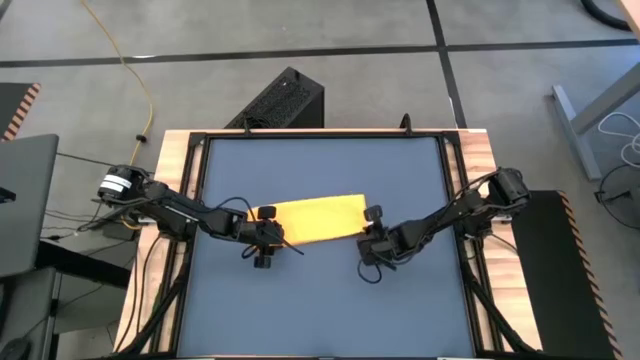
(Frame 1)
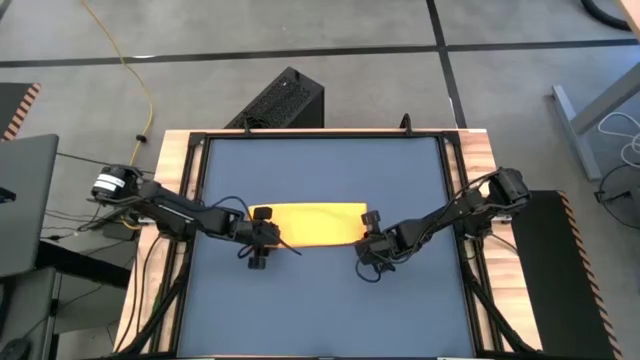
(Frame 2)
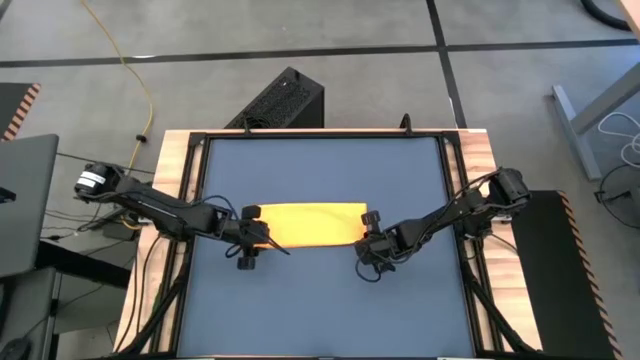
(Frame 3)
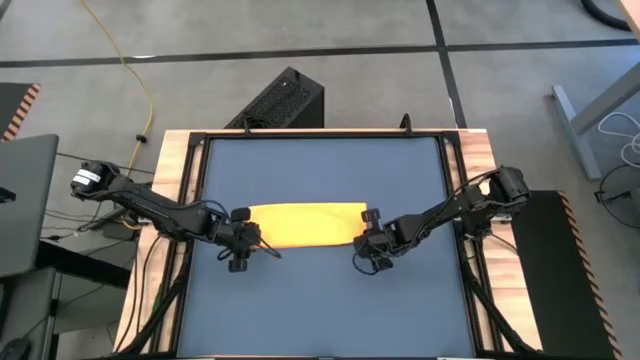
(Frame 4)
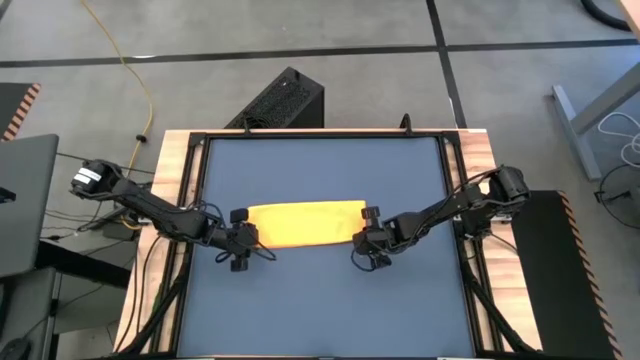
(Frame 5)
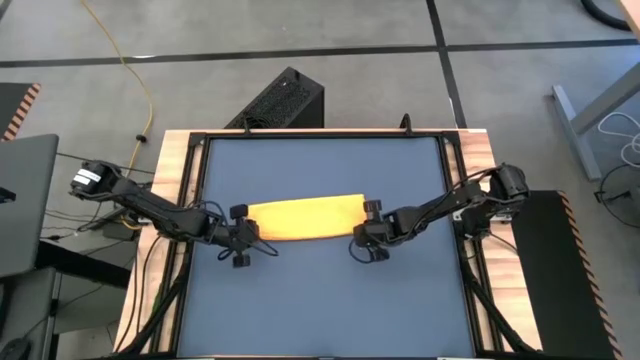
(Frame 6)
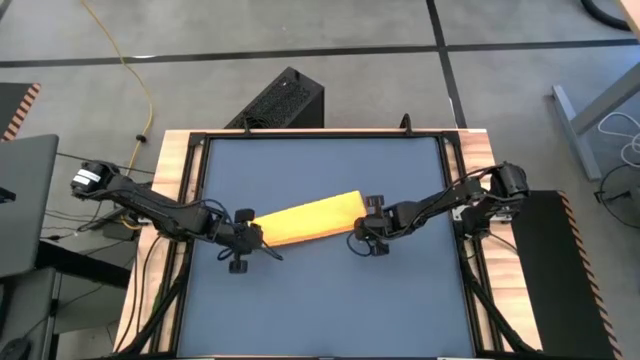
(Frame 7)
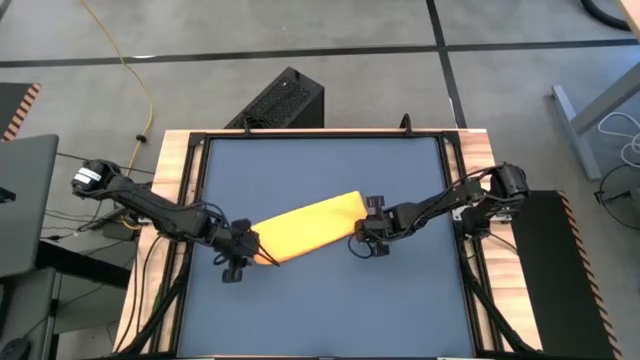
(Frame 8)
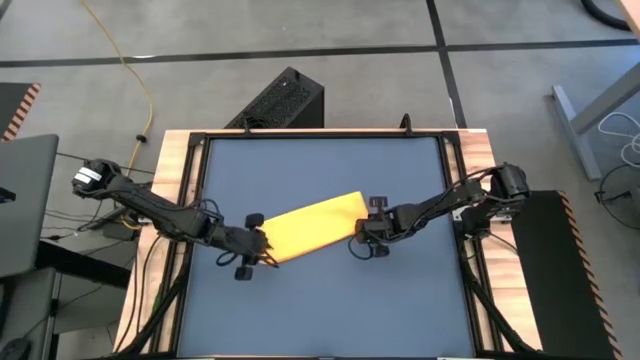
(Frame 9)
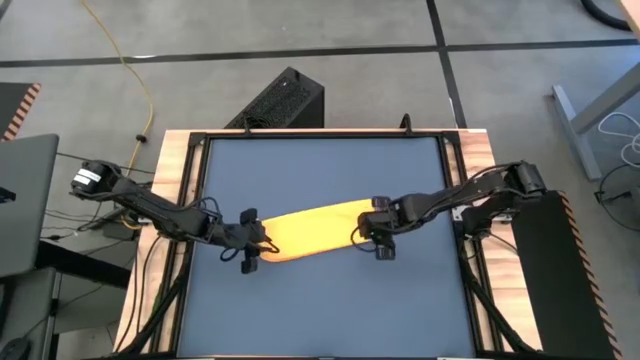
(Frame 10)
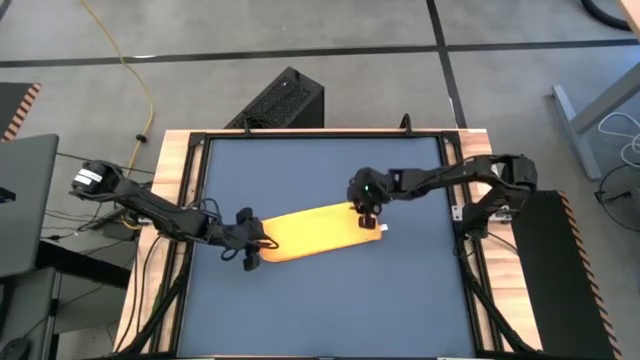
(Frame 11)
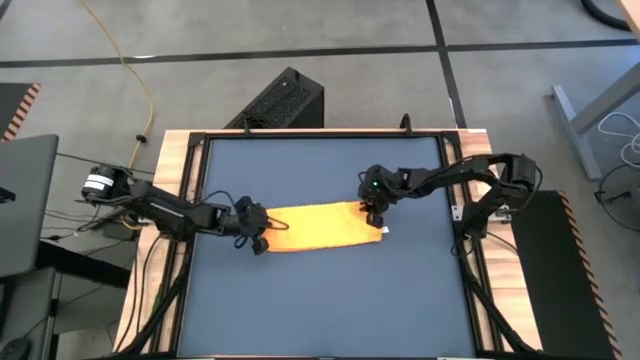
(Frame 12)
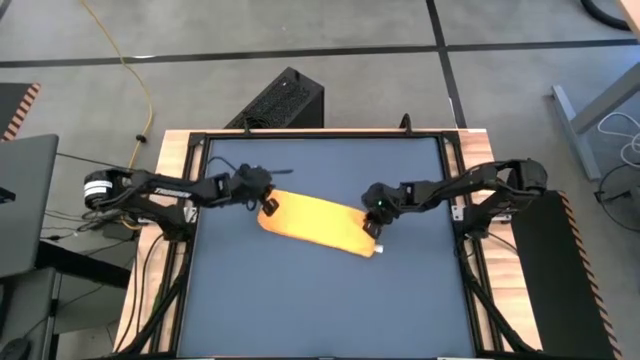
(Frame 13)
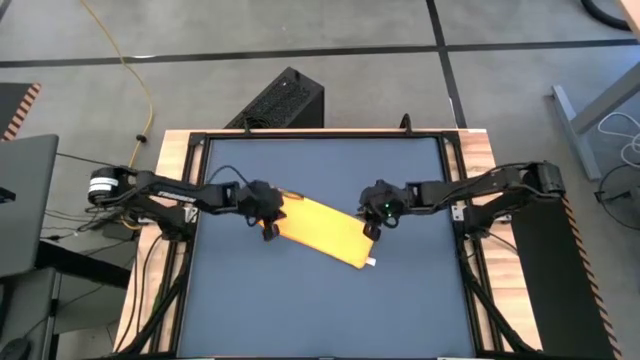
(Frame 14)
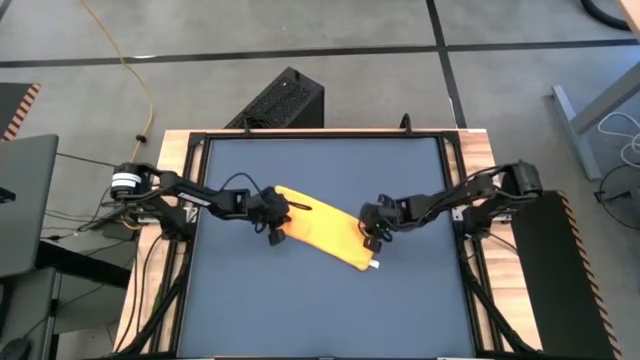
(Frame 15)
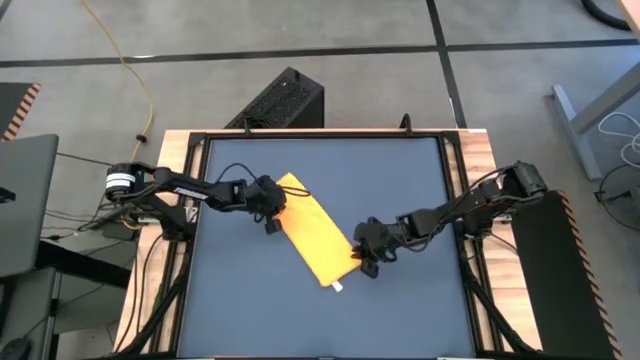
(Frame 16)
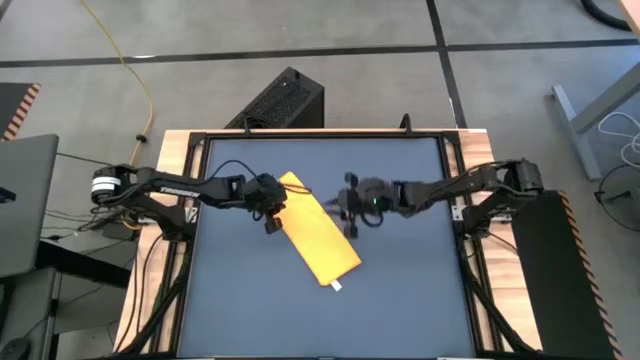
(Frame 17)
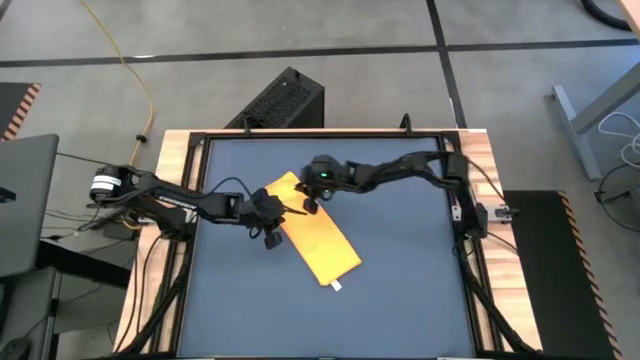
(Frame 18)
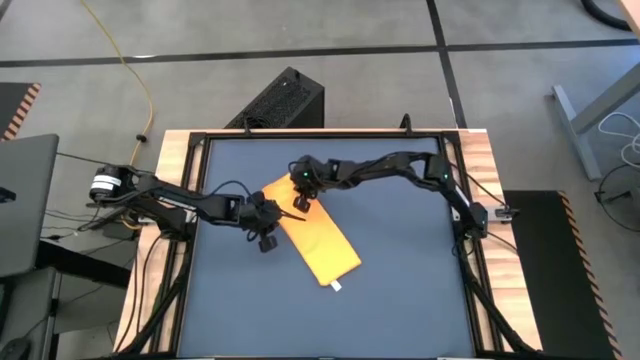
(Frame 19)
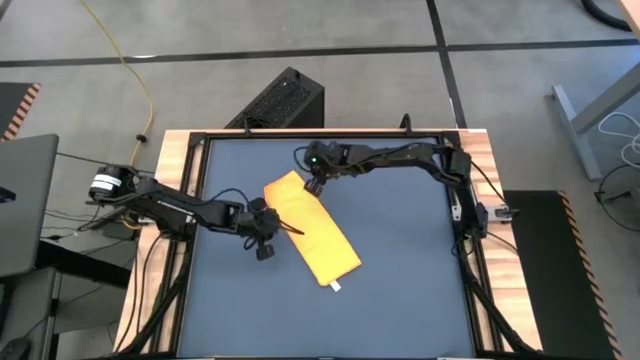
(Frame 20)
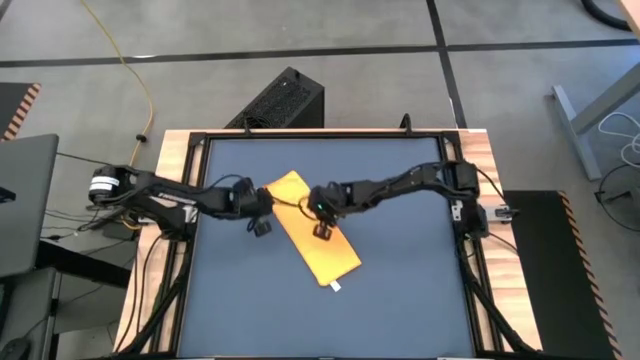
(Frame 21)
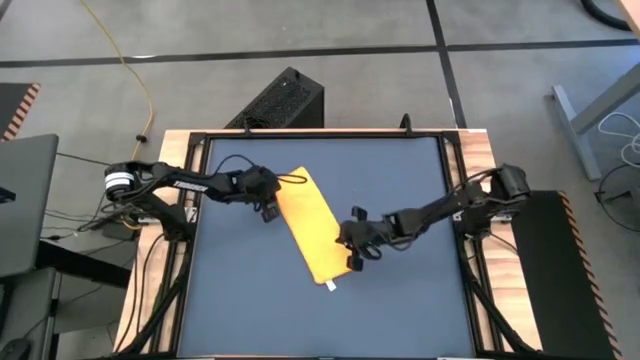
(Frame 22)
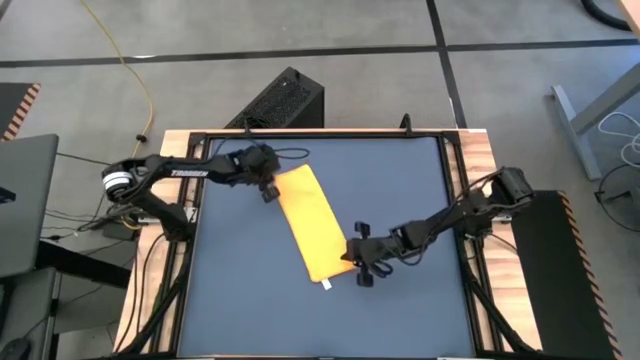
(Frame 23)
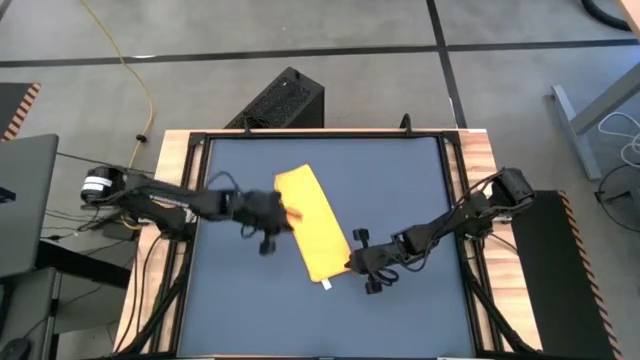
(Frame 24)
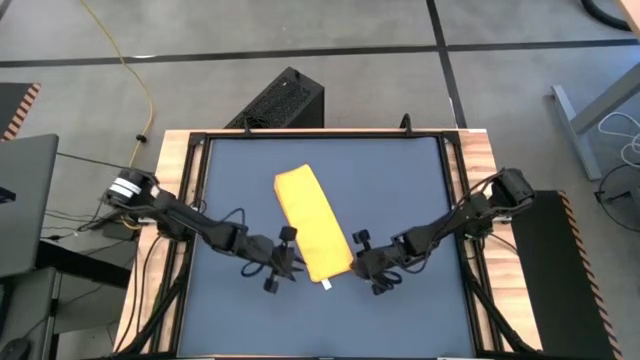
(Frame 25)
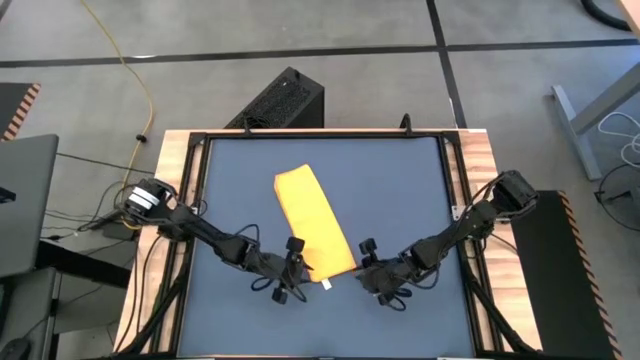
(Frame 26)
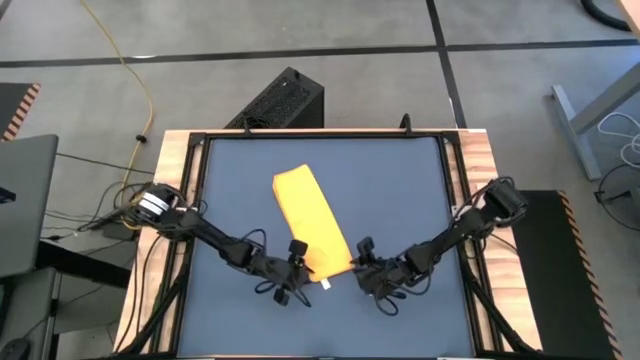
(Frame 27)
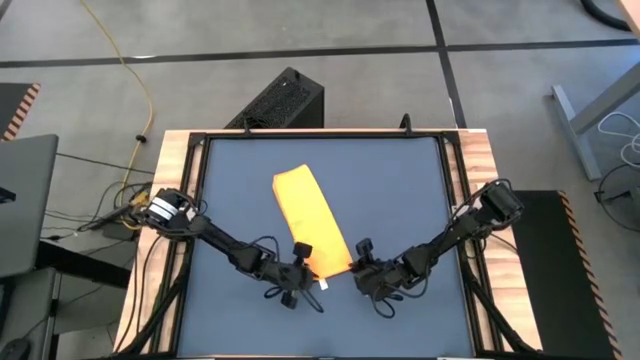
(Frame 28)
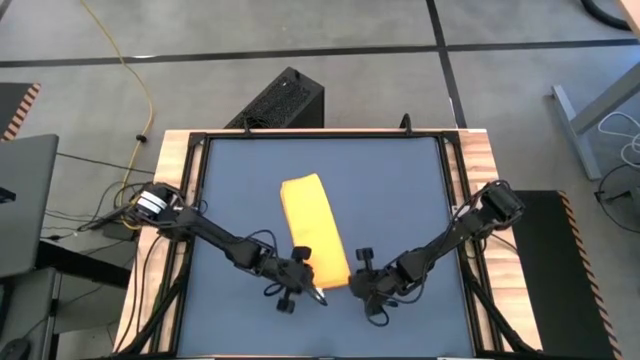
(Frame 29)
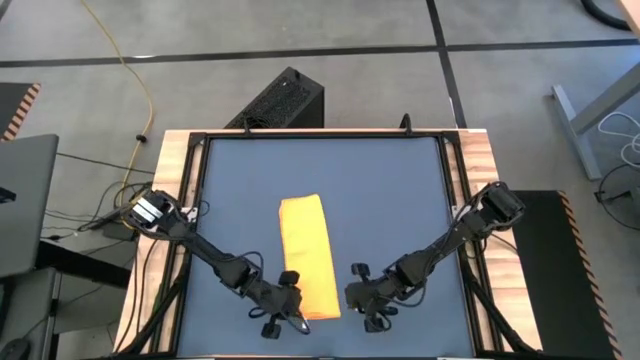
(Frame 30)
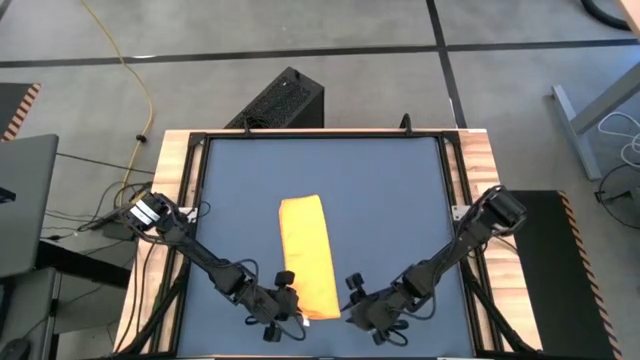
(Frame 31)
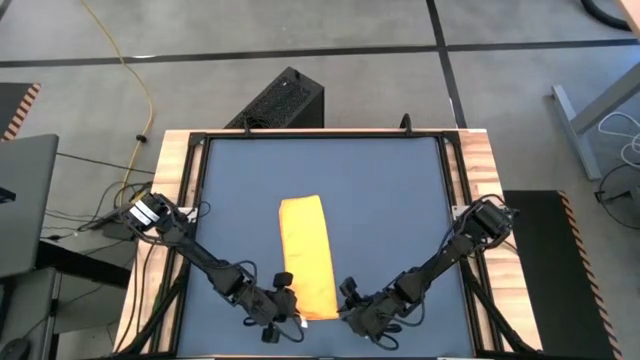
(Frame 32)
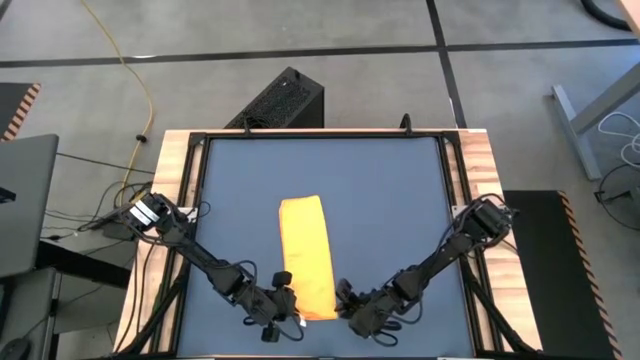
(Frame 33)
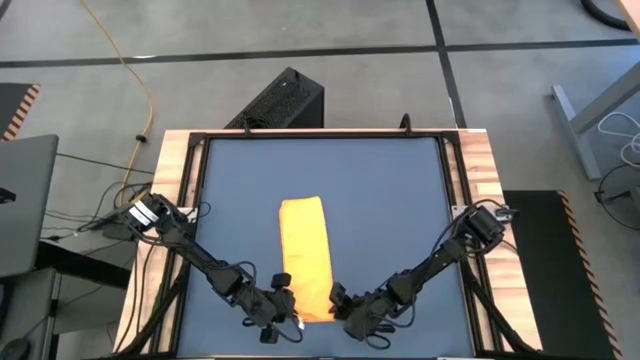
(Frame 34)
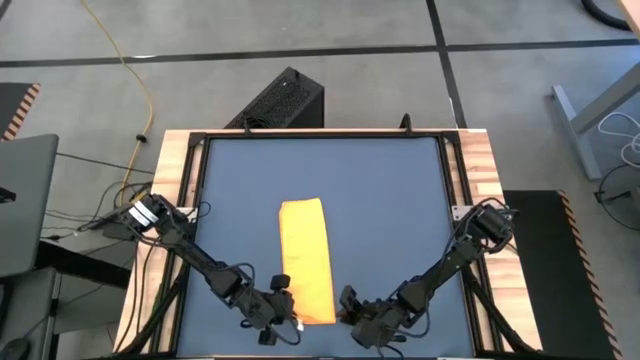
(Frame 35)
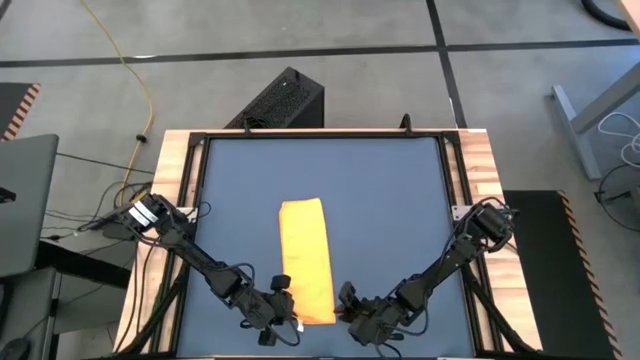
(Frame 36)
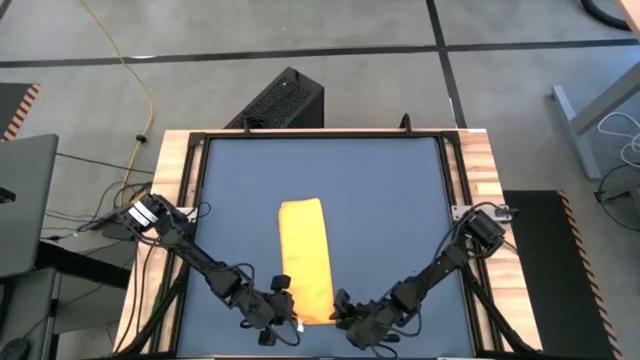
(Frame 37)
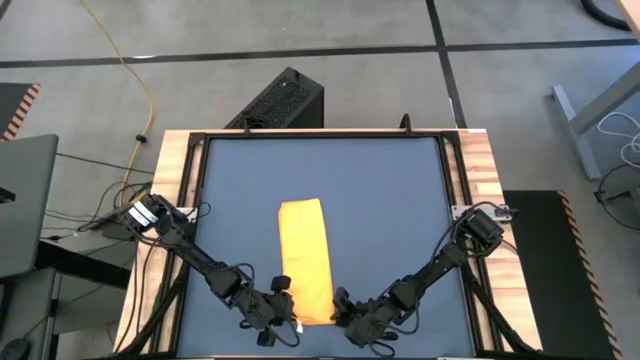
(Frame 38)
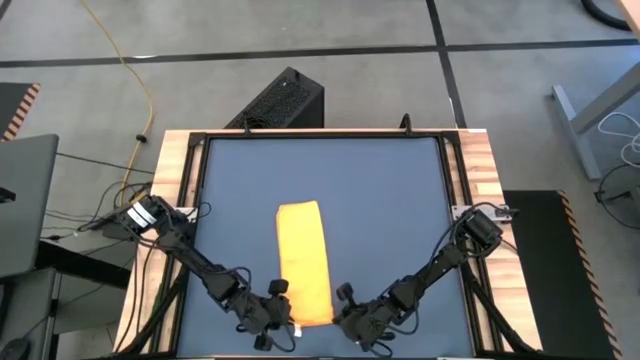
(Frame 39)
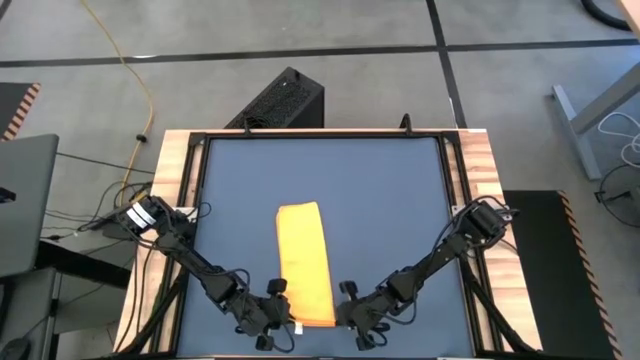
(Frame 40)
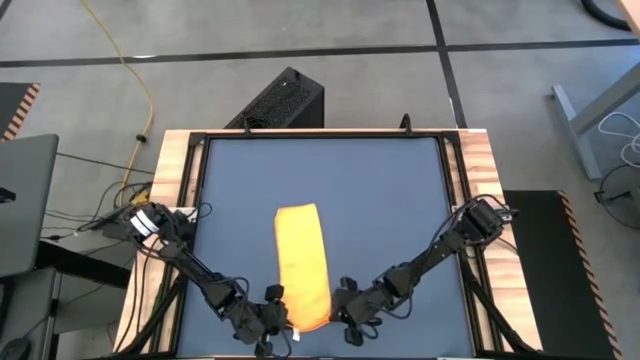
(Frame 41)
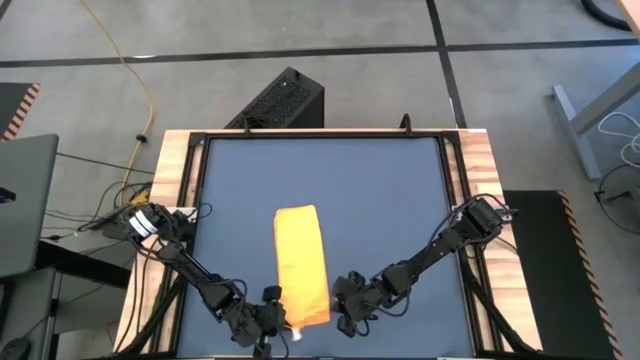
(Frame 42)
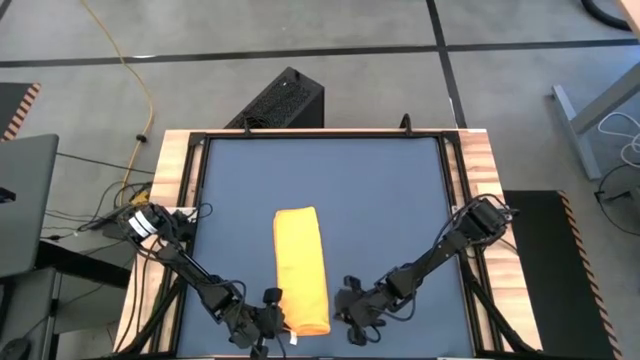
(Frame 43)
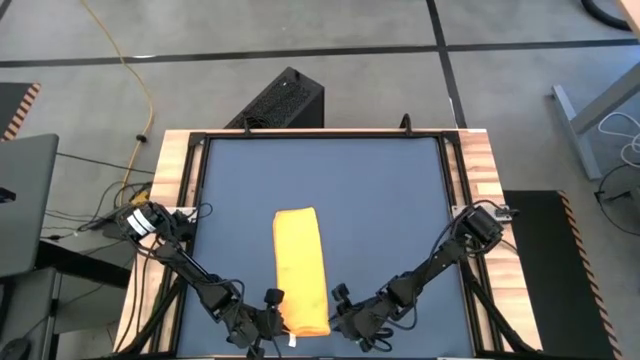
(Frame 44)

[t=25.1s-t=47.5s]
Task: Roll towel
Roll the orange microfiber towel
